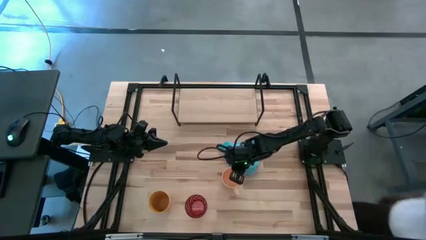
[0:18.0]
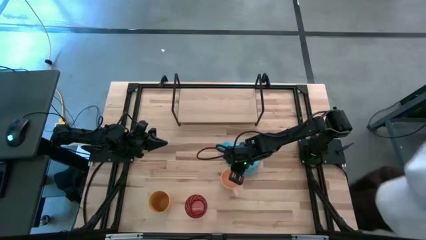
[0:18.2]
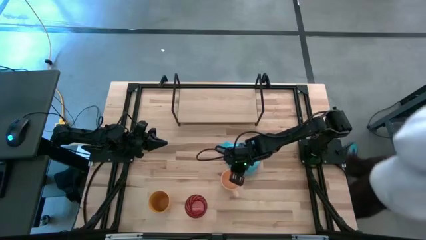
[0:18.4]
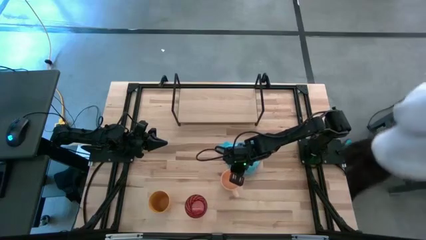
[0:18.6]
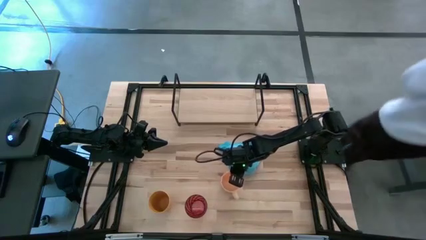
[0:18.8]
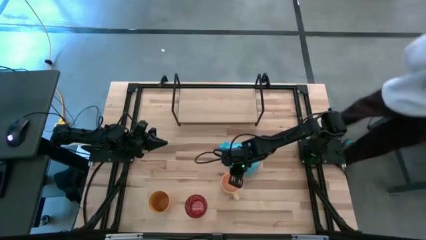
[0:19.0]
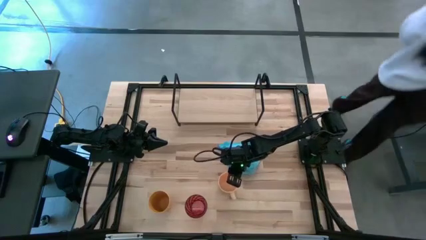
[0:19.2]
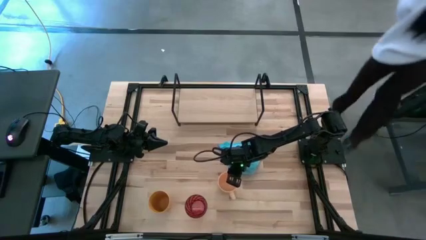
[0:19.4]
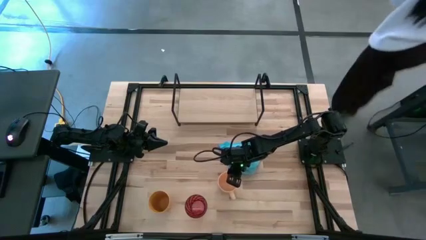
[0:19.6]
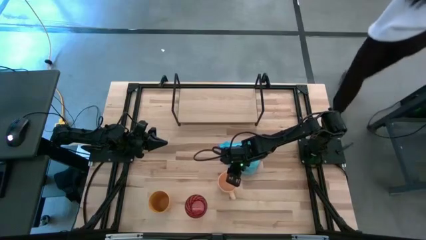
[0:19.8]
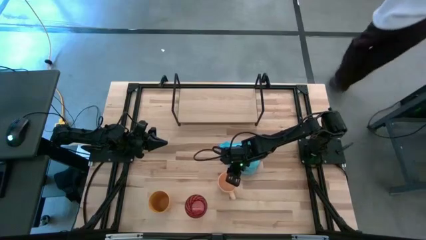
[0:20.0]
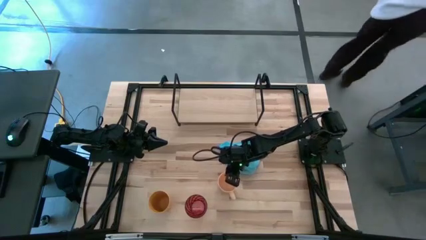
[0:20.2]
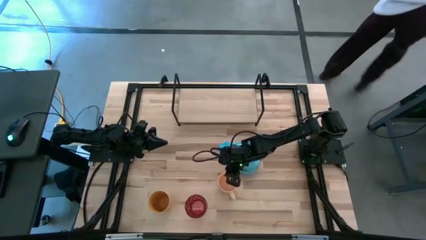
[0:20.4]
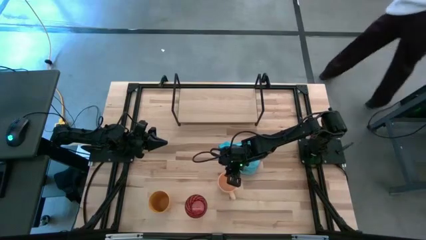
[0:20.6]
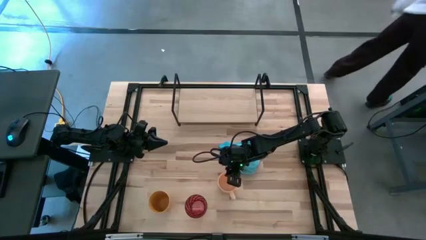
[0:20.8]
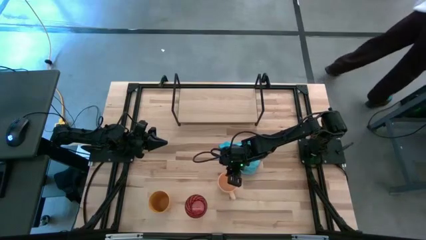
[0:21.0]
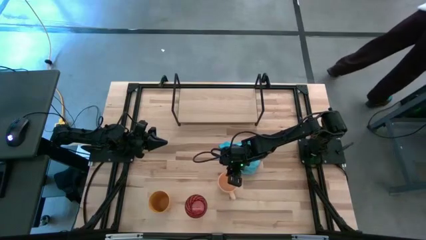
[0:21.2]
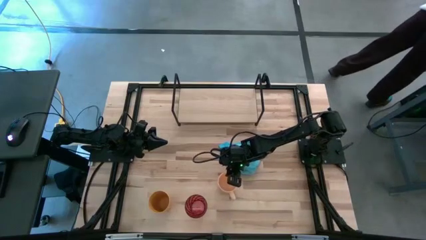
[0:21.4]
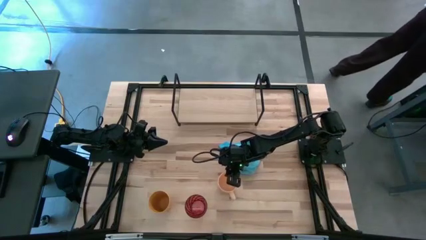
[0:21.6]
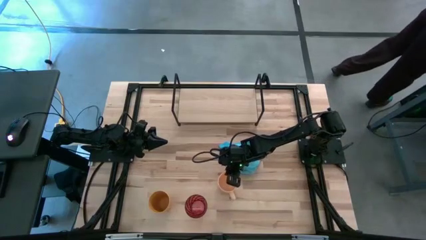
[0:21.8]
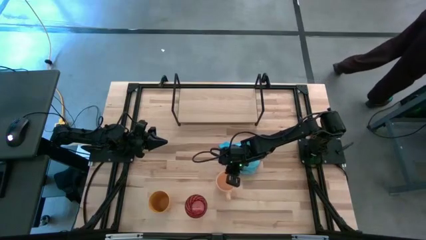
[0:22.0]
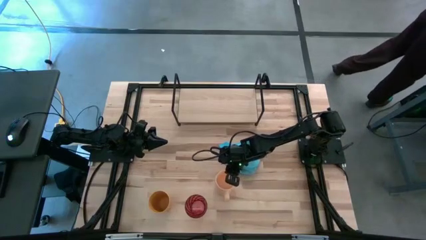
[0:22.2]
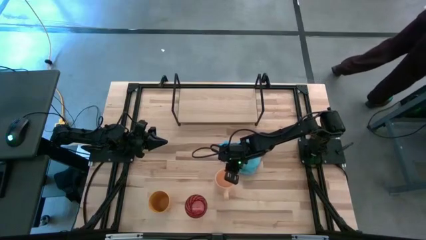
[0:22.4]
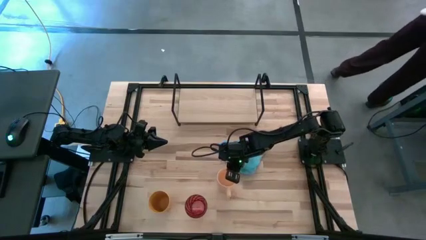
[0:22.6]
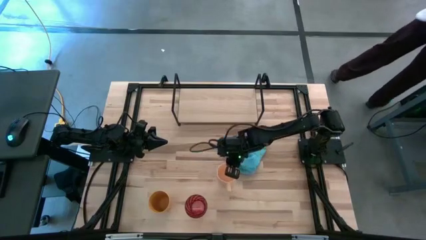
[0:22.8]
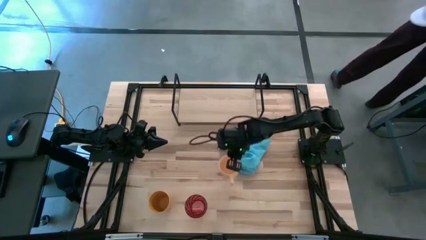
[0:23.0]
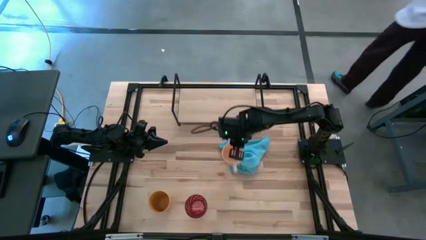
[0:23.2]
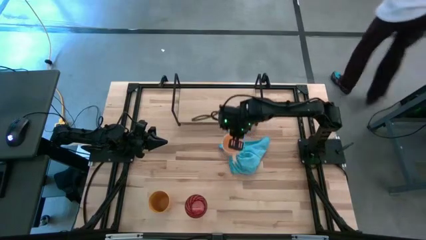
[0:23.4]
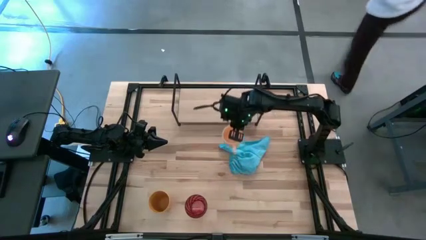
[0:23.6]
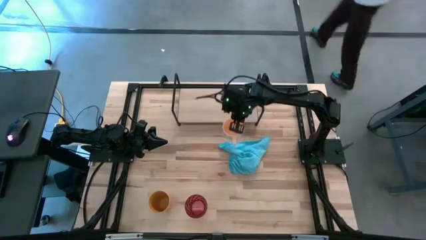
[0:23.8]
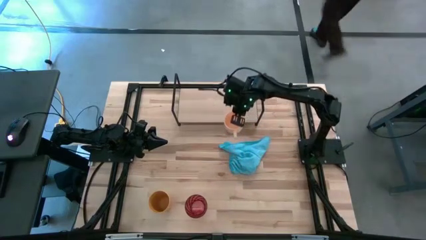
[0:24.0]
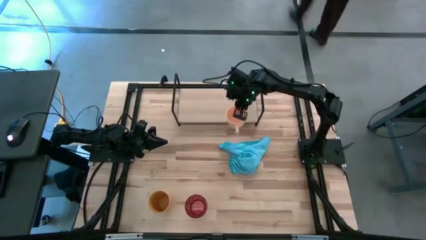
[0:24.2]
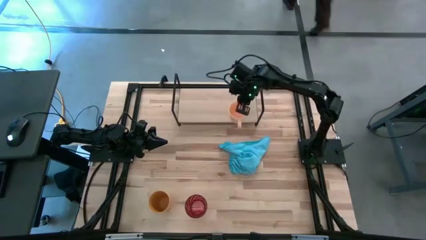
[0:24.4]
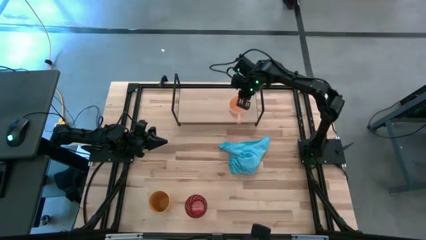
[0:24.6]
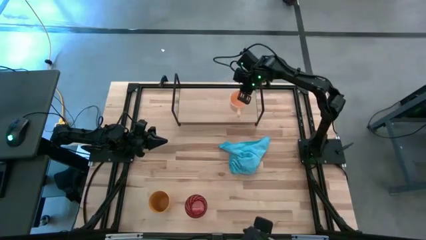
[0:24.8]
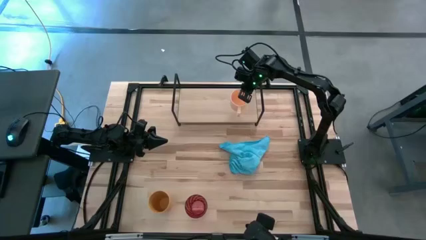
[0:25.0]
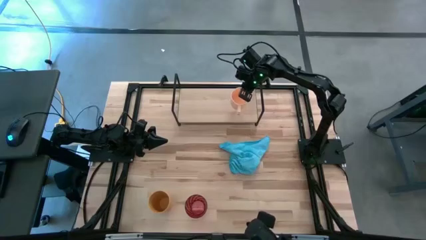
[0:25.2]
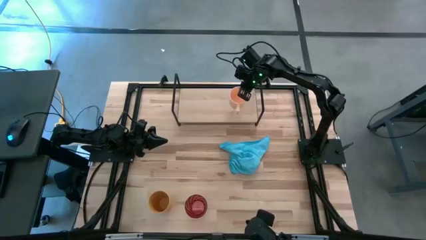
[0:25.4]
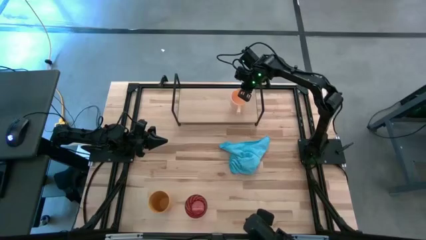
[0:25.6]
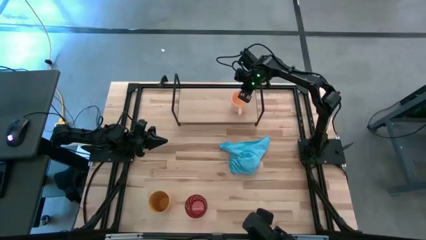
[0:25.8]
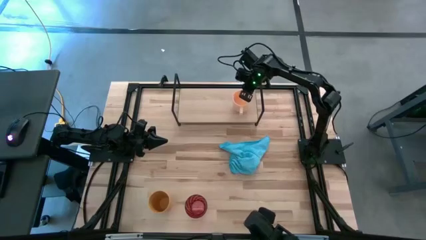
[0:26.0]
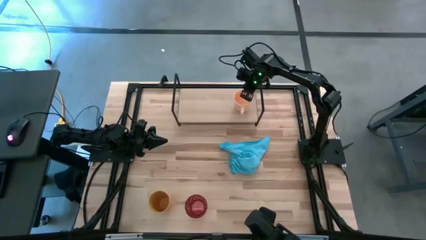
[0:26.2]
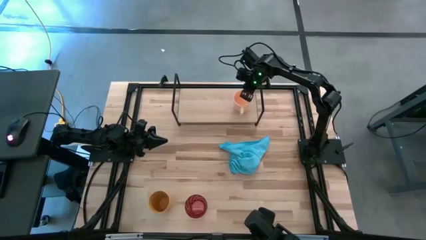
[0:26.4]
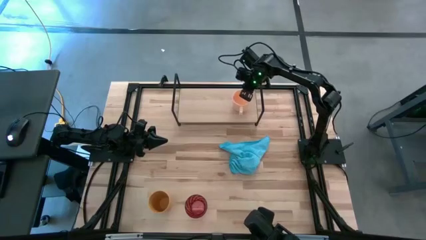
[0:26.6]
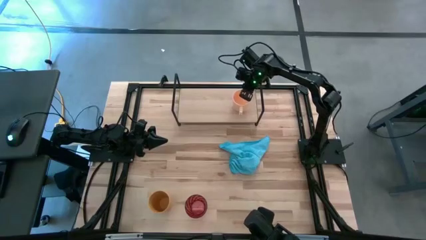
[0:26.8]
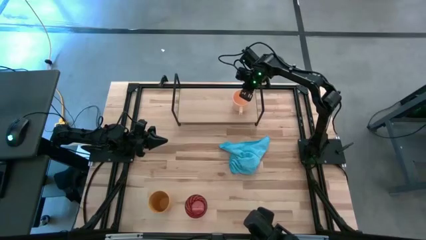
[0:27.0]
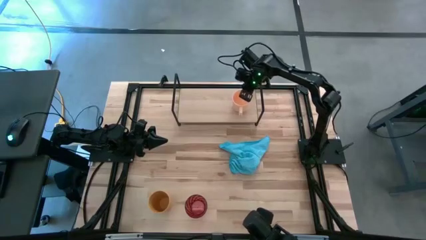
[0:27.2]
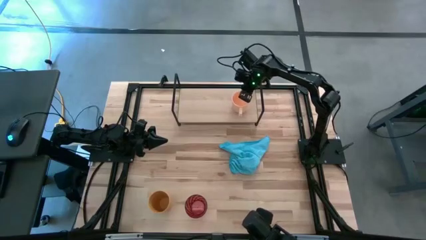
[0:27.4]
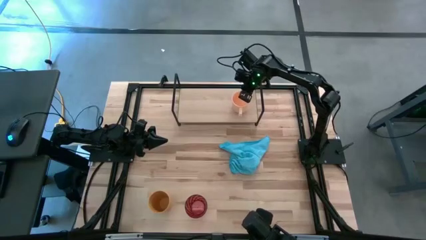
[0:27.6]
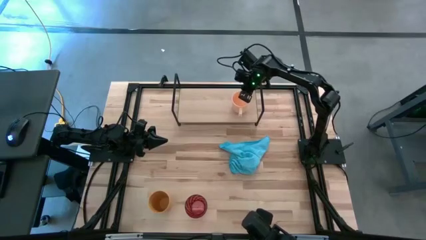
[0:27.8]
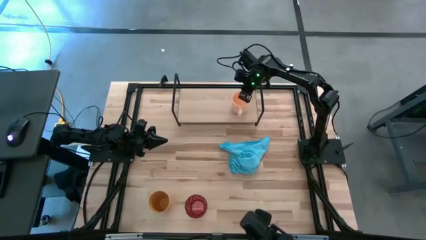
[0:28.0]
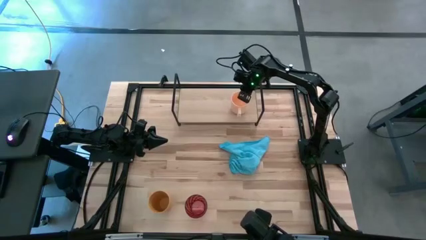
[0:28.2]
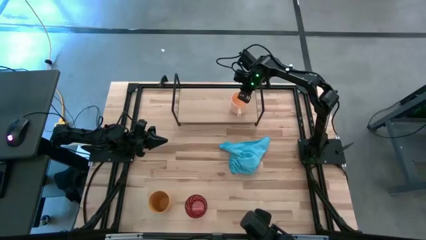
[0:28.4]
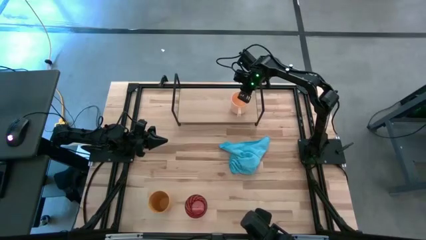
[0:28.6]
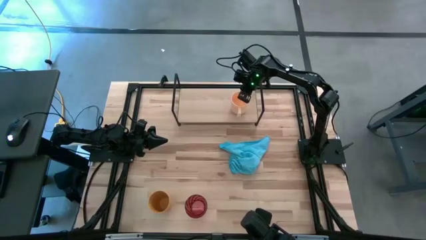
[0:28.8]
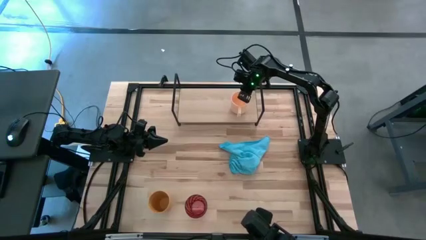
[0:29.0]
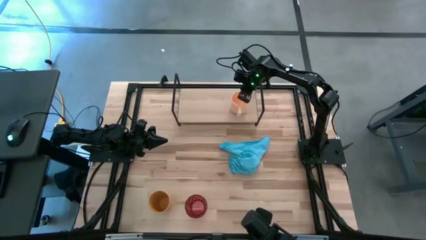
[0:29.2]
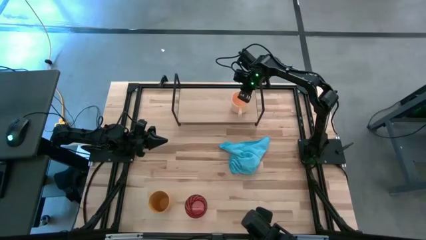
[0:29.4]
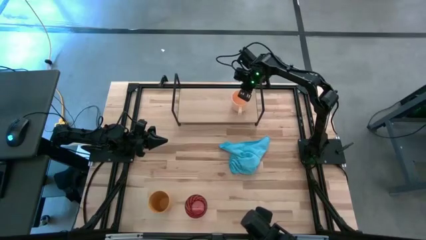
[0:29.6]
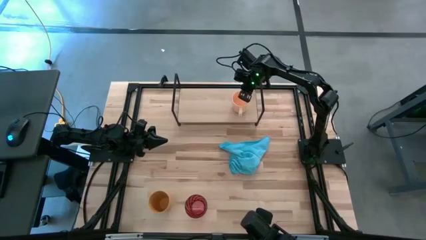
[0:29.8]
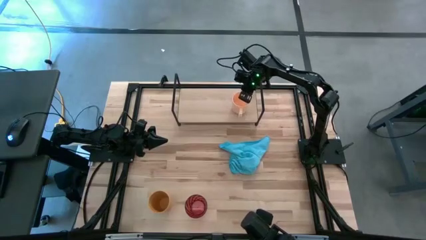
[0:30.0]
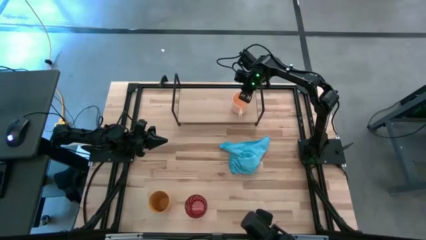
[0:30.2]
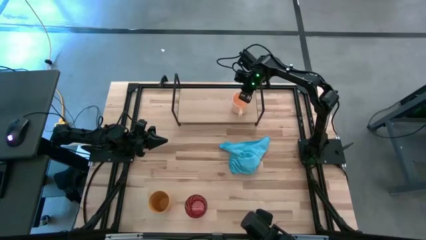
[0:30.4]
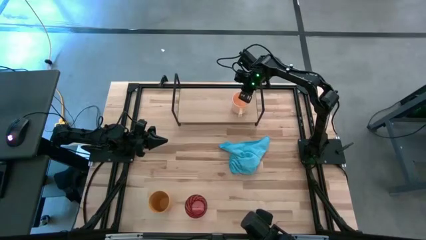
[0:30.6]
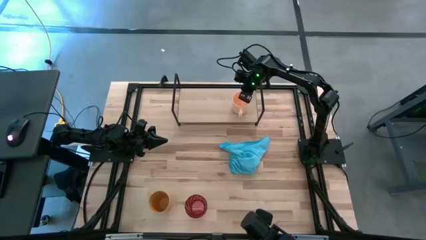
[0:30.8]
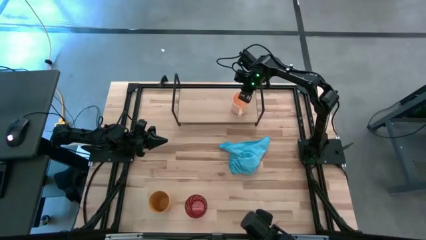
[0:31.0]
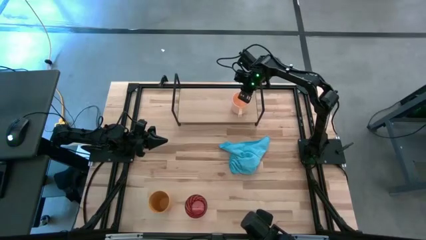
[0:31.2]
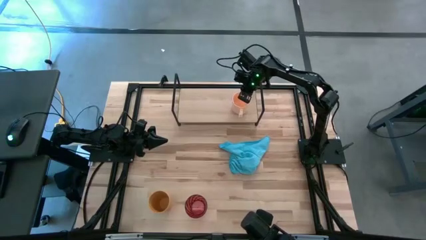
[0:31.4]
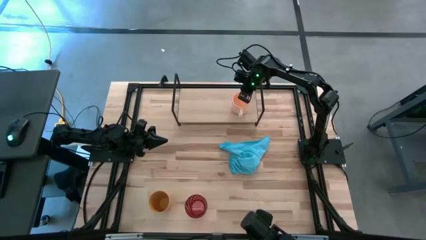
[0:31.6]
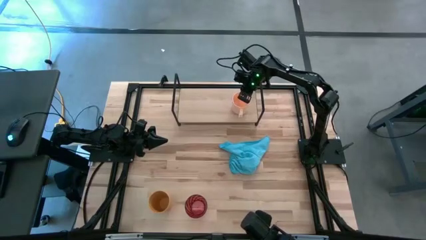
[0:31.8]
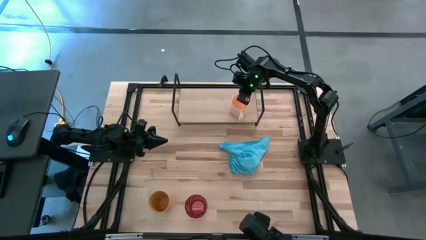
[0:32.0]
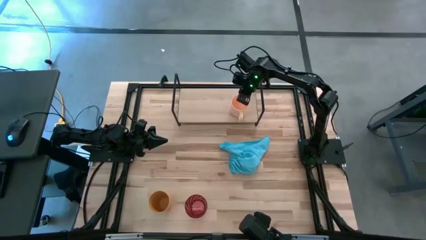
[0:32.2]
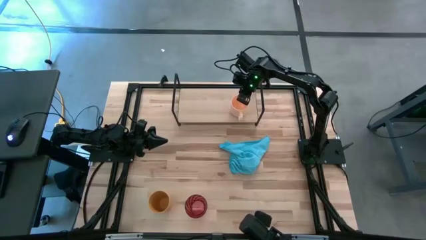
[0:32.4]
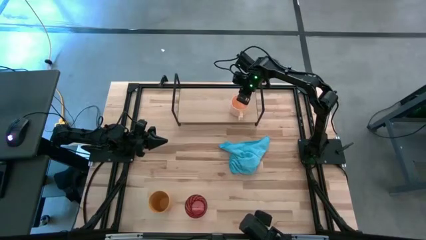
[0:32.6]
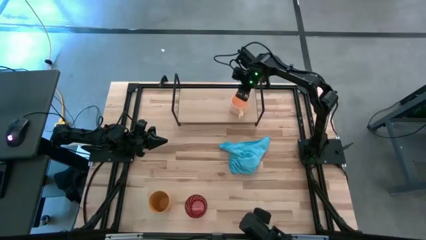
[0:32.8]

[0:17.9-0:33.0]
Task: Stack small to large cups/mugs on shelf
Put the orange mug on the shelf
